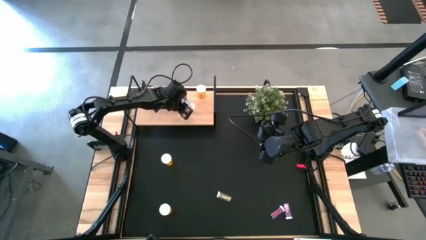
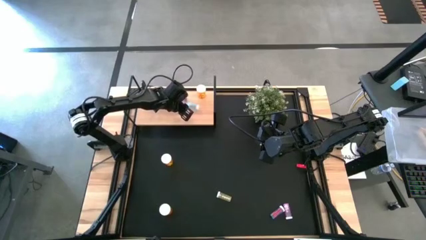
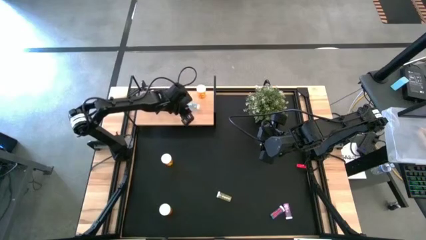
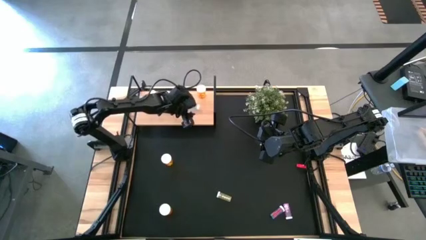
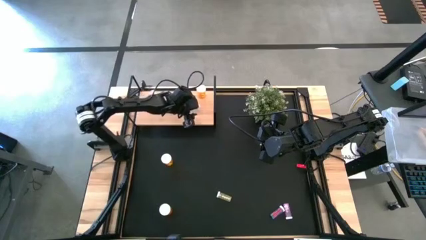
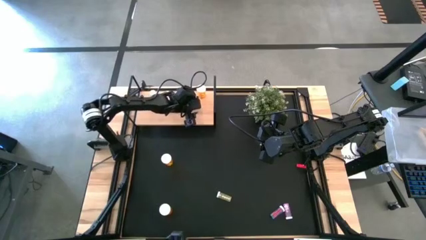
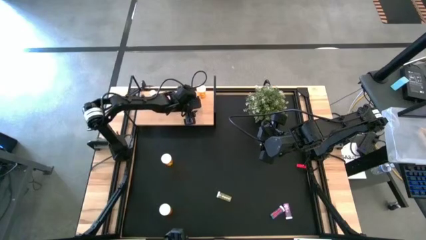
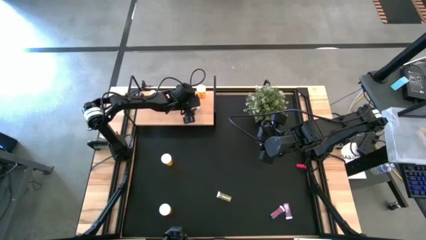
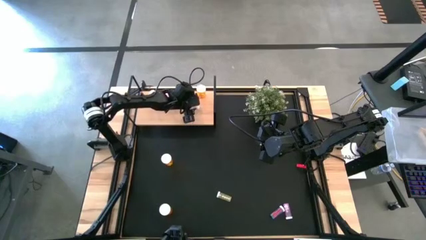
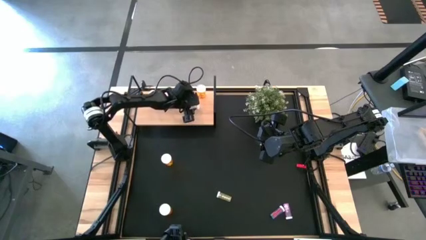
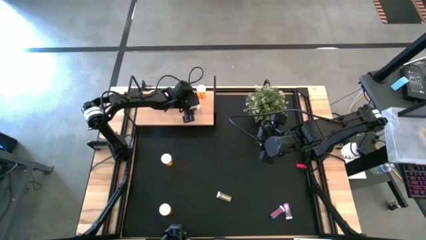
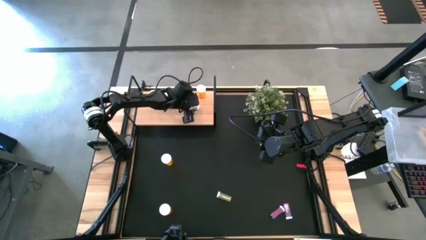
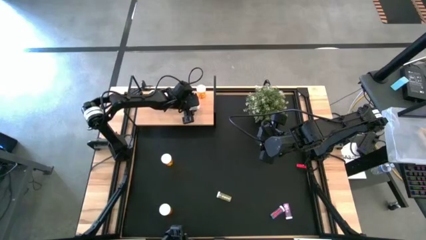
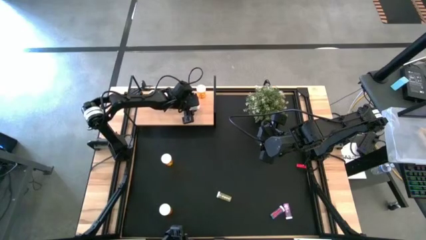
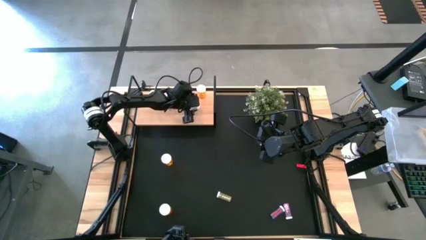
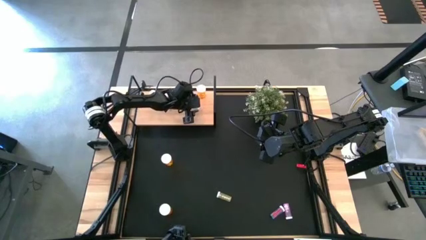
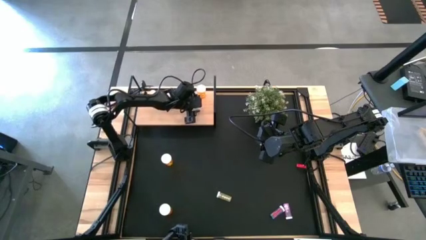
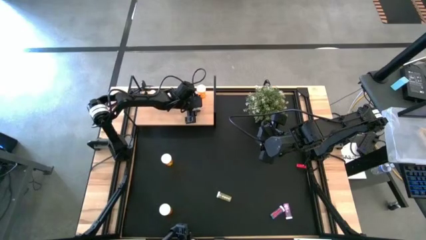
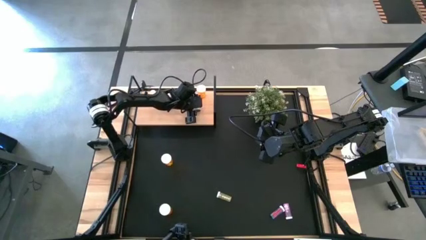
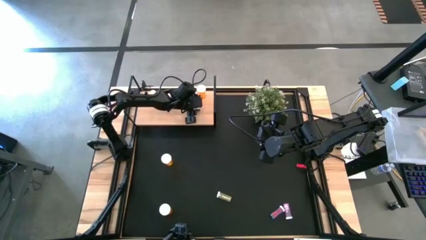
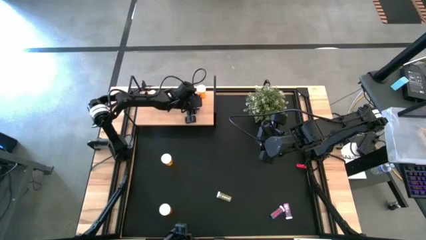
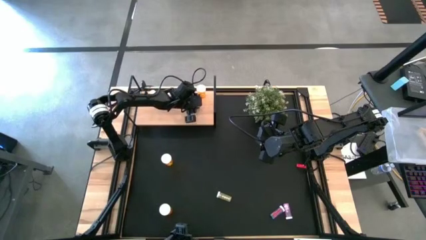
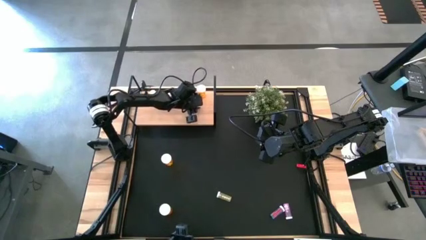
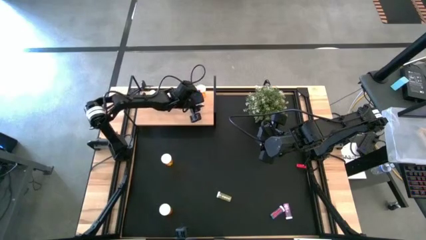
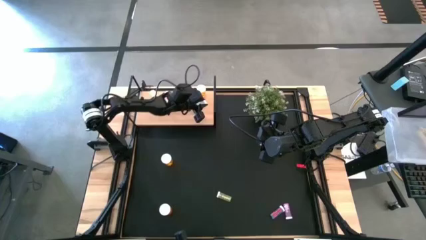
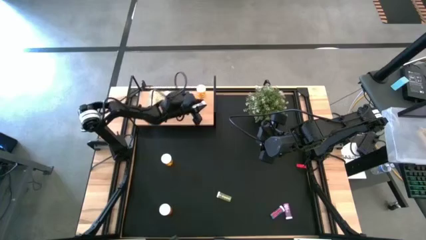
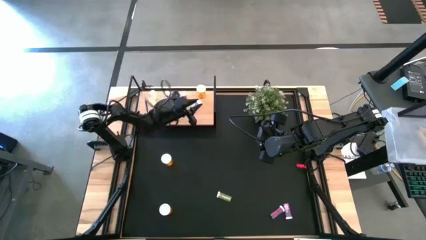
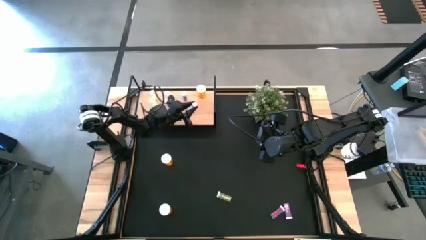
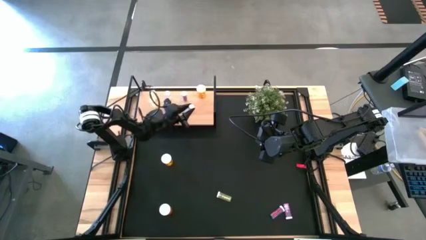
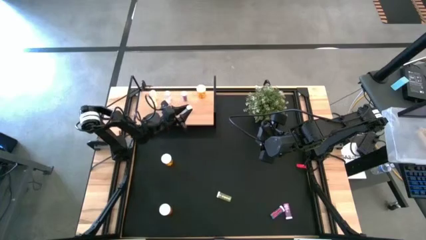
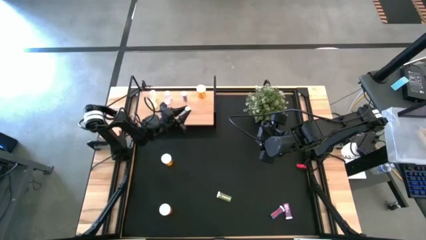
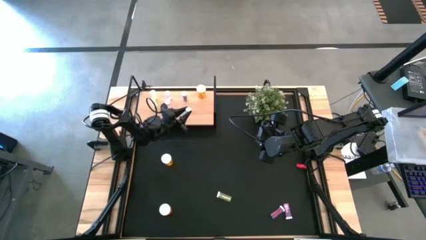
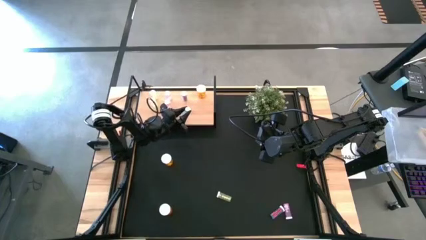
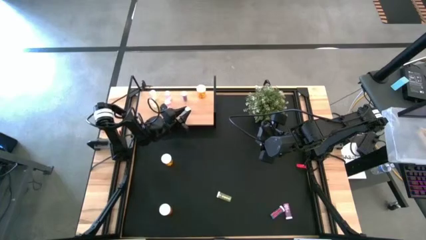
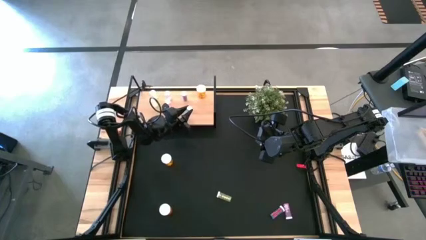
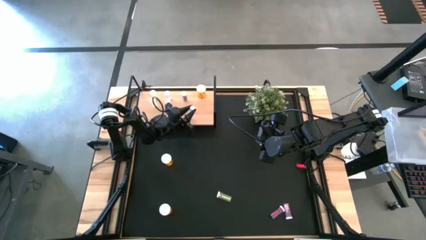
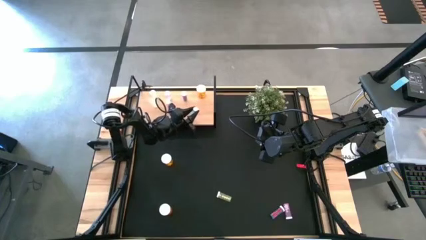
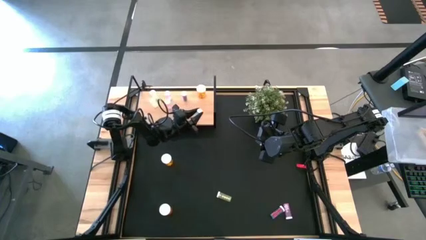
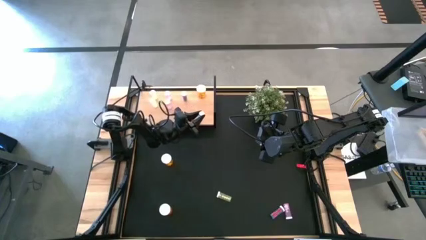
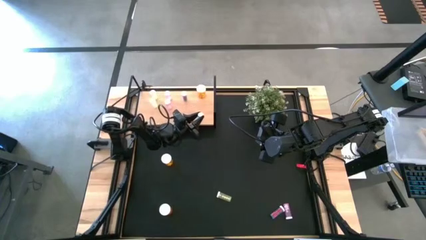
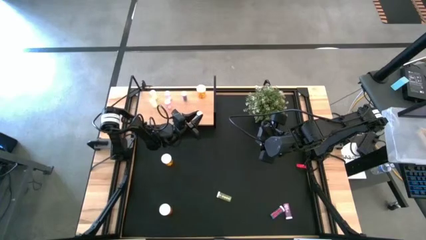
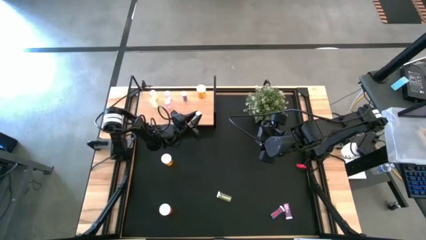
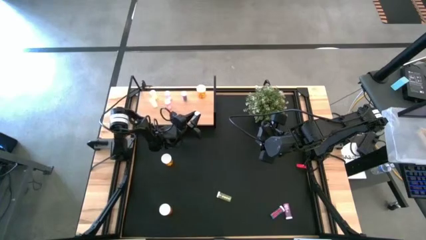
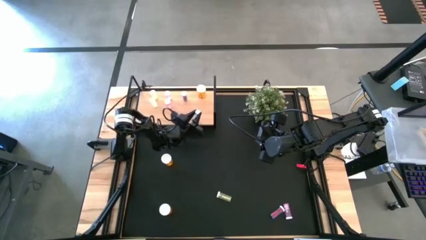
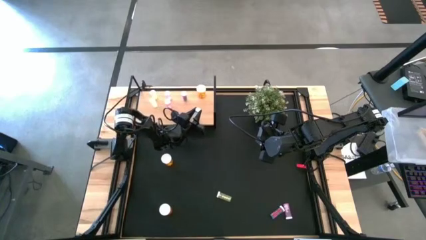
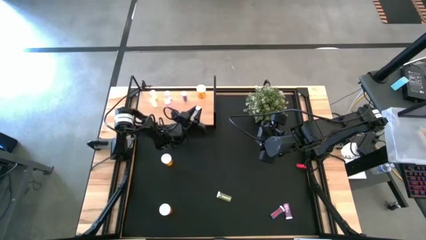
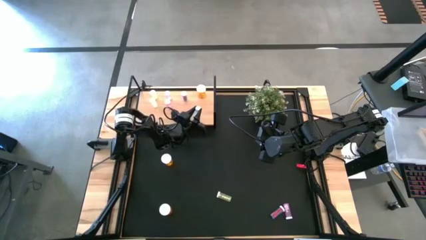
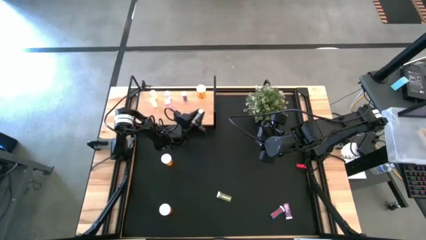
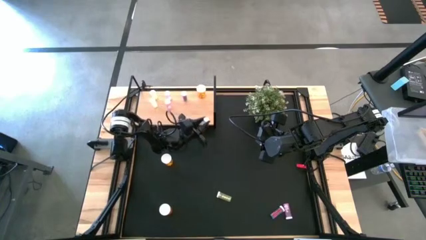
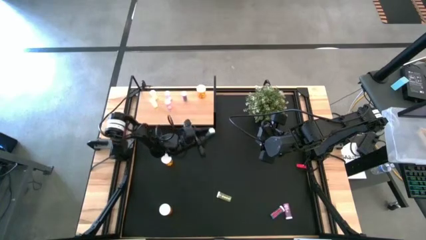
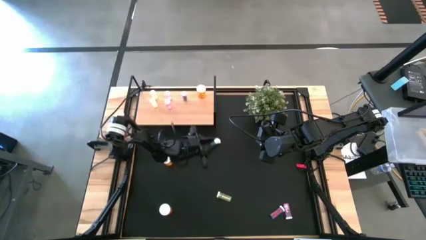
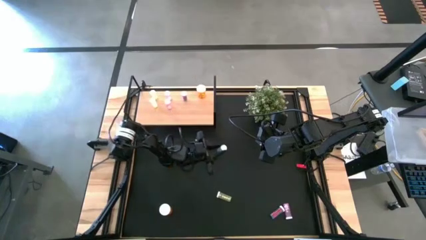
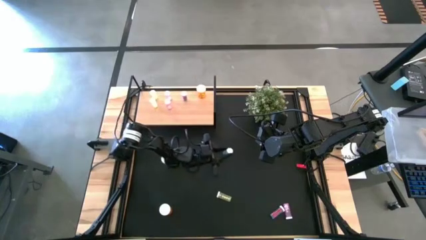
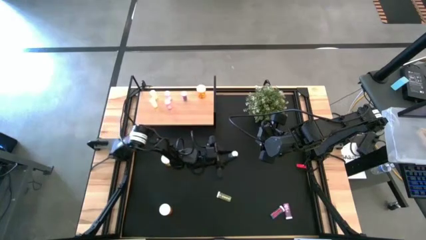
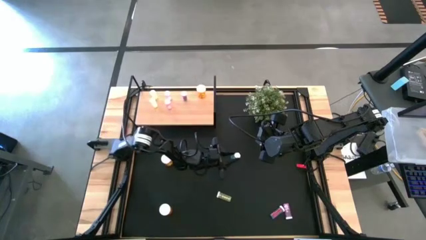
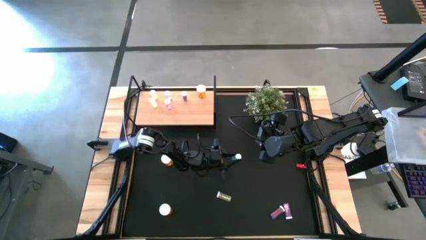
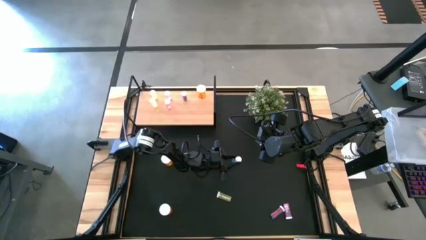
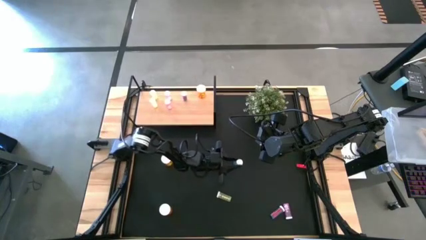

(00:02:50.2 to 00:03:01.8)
Task: Pick and place medicine bottles onto shelf by color
Put the top blue medicine bottle on the shelf aligned with the other blue medicine bottle

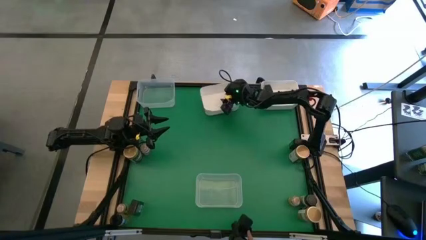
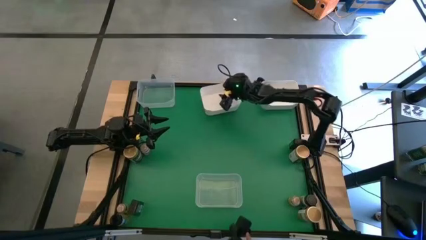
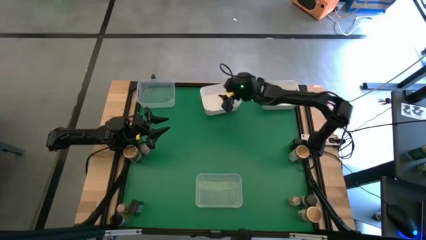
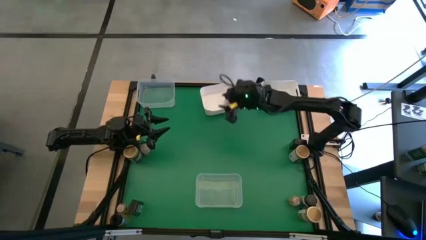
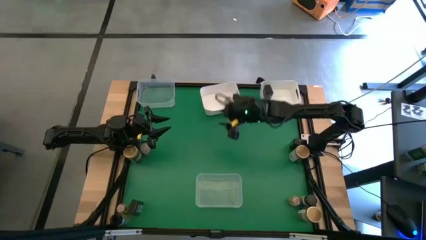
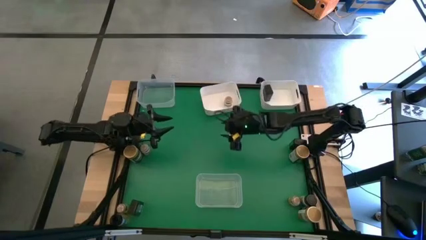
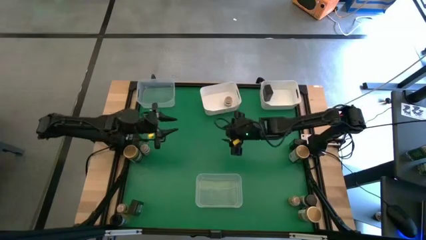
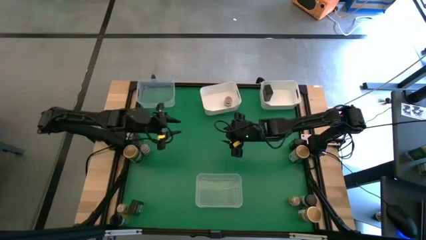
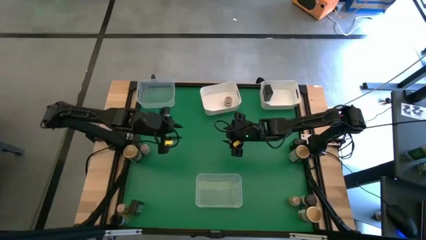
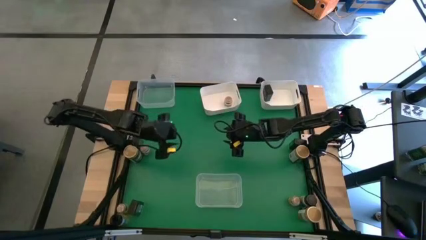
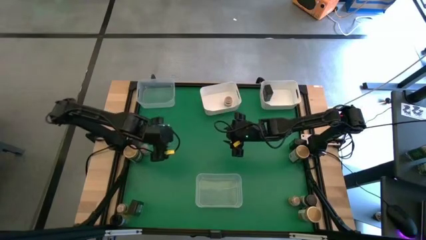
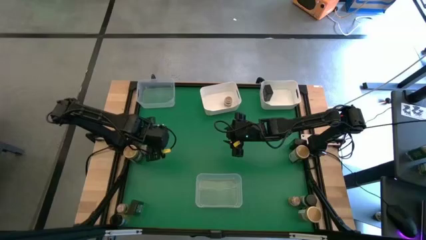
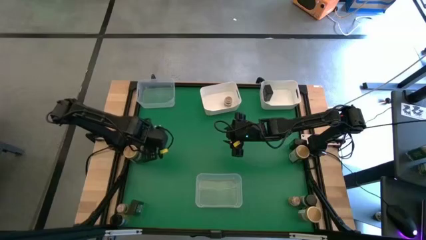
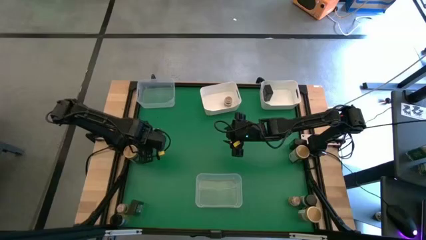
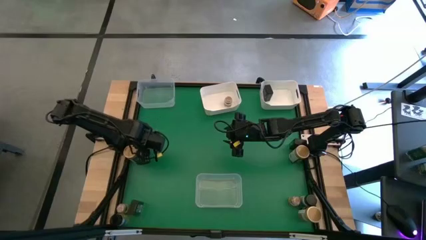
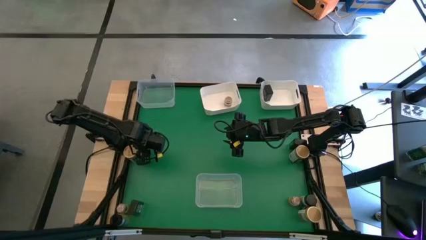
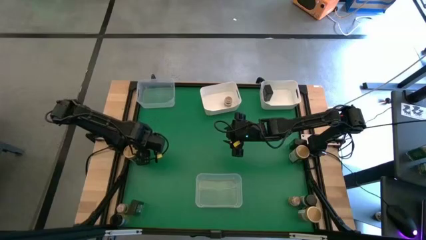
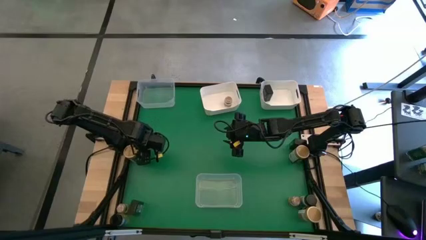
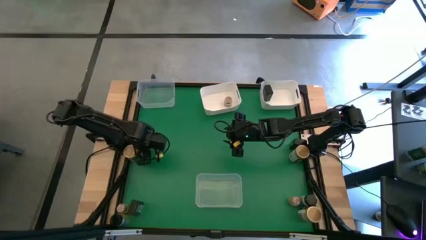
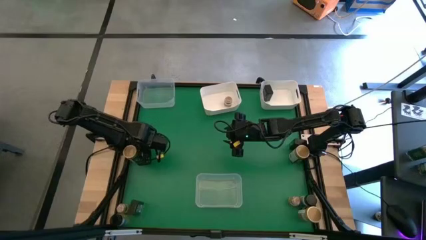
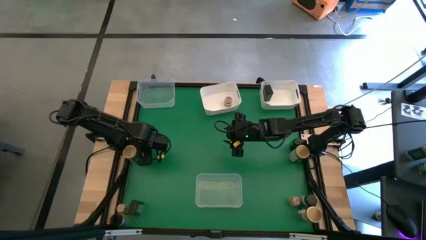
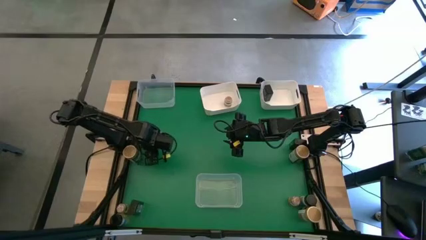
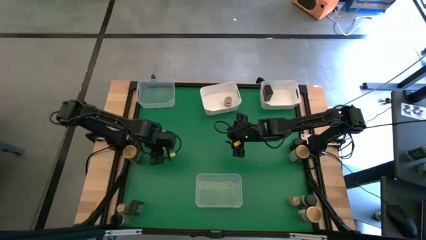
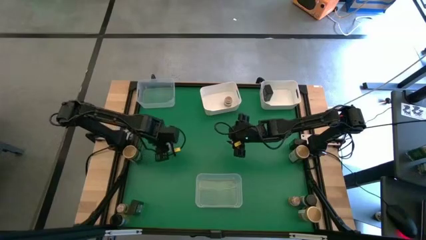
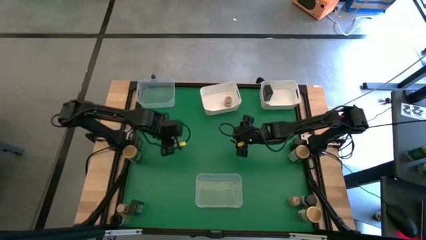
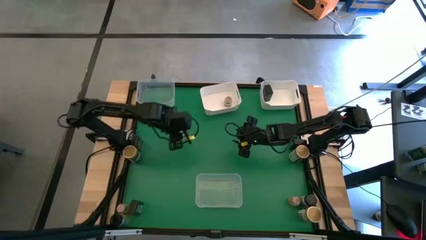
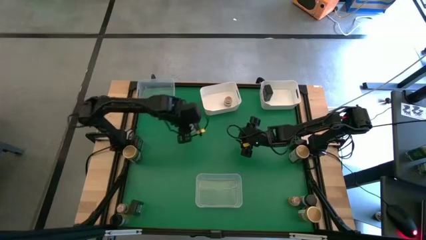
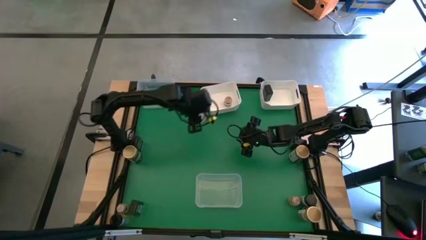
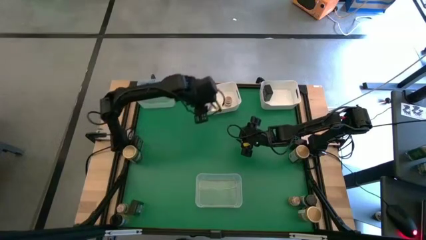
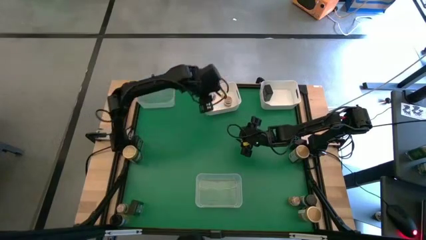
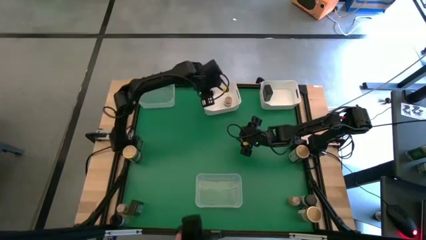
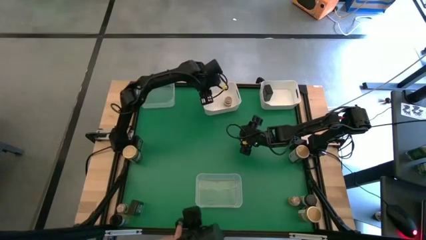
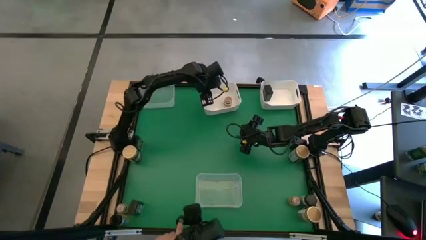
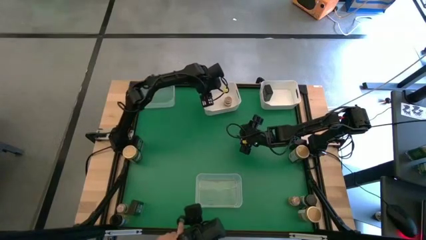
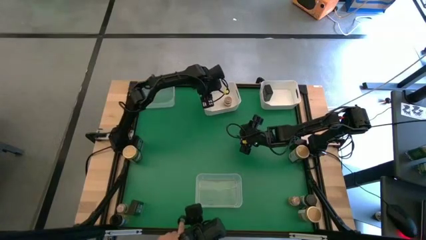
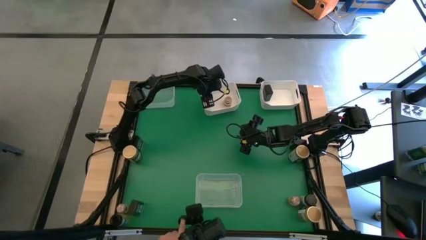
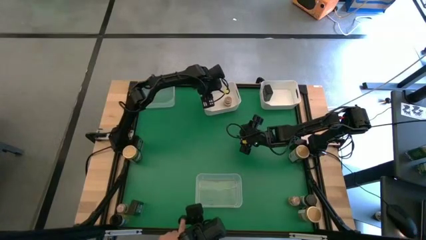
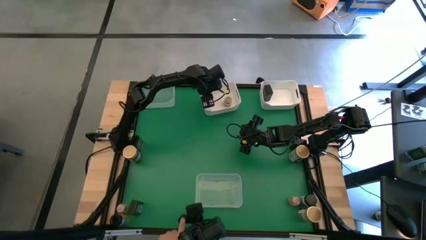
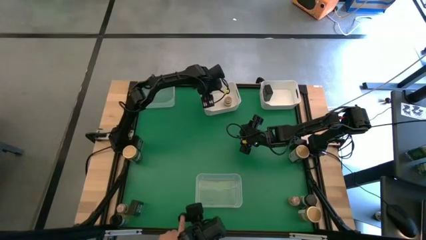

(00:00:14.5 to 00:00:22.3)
Task: Sort spices by type
Put the brown seasoning bottle into the left white bin
